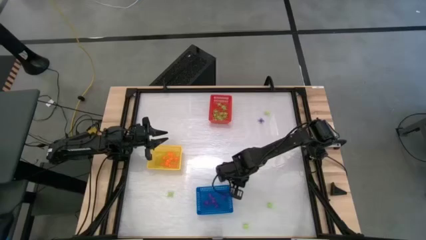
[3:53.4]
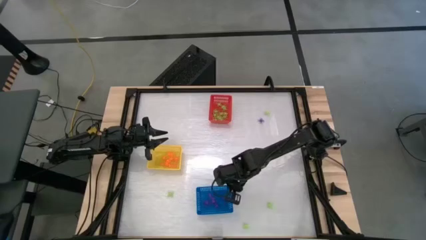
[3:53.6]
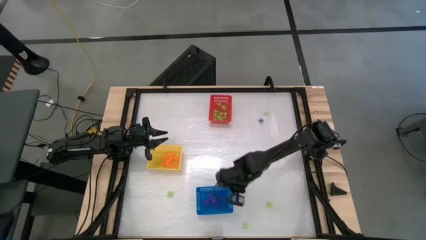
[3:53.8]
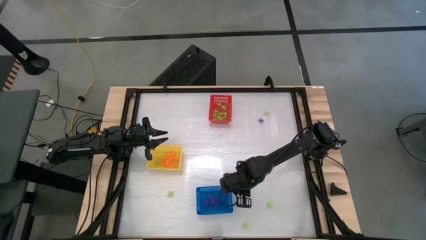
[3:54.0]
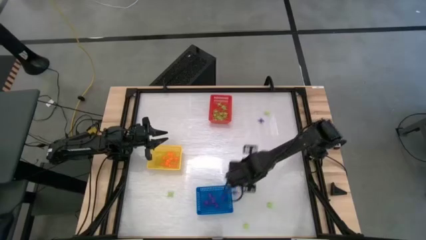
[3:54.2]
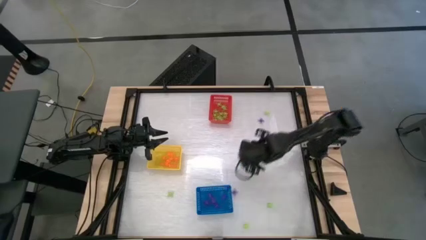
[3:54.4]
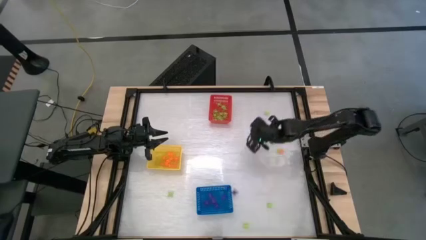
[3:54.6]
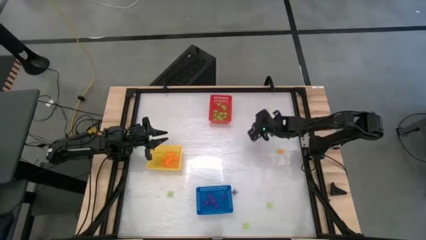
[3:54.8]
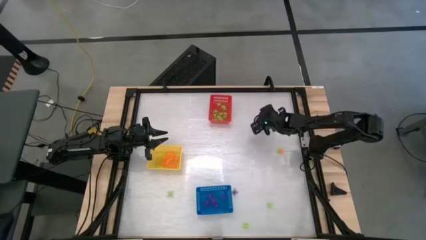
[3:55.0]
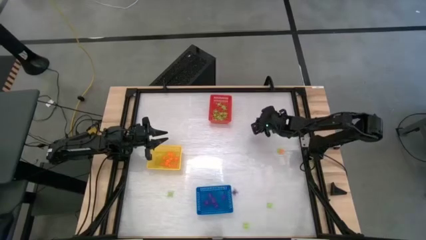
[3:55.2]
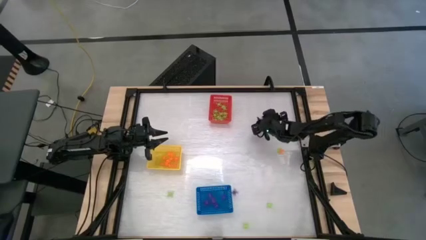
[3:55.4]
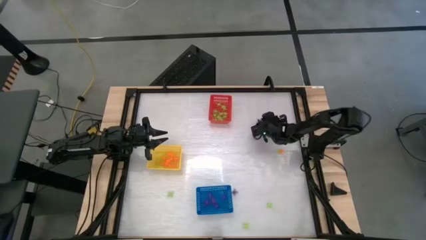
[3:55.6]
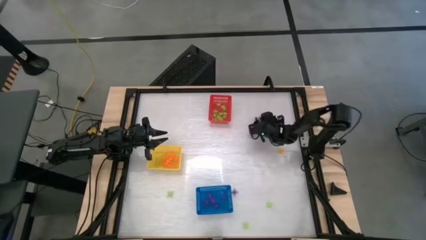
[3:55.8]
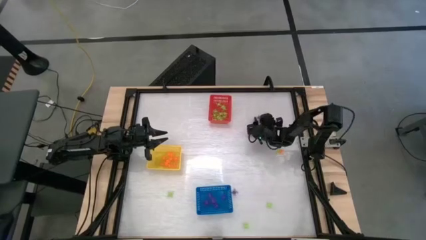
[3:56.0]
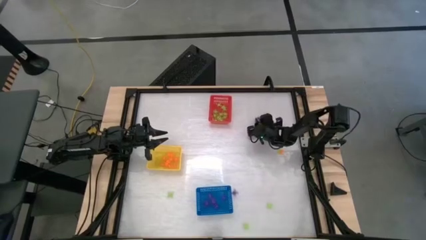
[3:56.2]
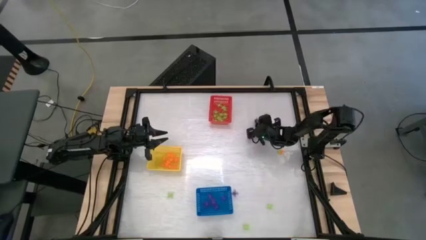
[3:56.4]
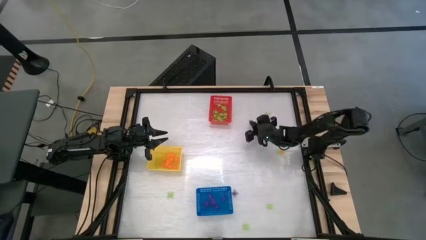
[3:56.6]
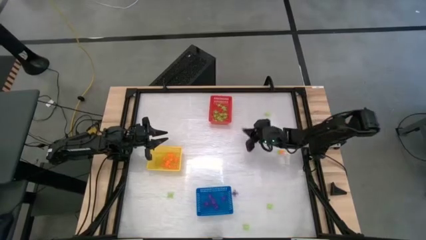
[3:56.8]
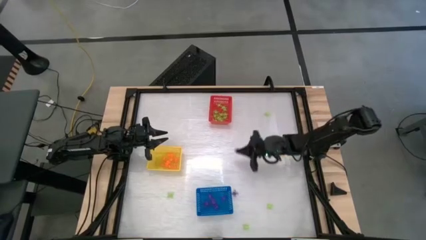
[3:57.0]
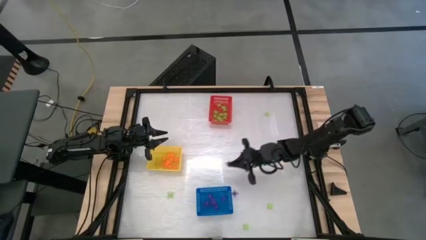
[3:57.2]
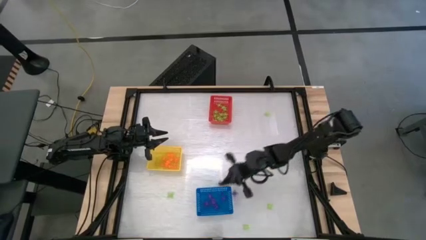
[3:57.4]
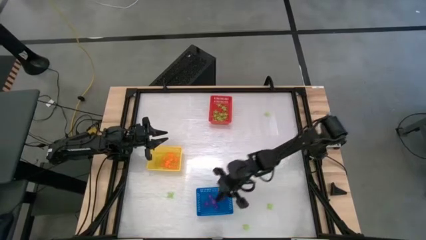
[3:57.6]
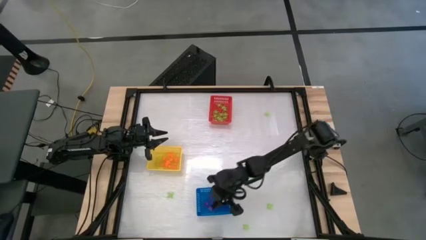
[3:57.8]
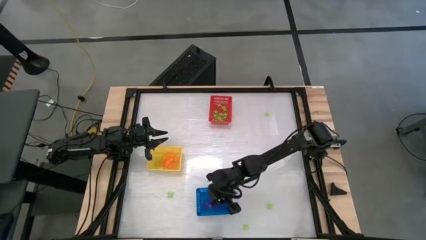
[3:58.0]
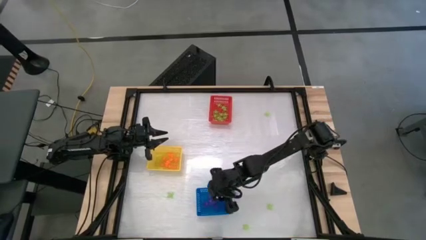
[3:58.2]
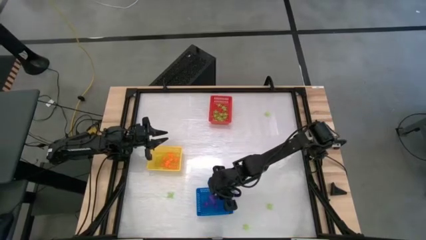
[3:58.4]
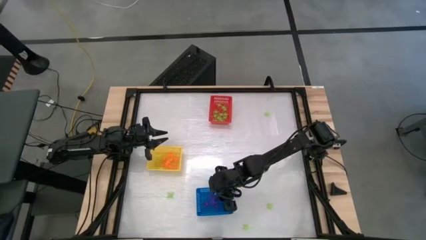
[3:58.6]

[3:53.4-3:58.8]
Task: Sort Halloween decoration
Put the purple spider toy into the blue basket

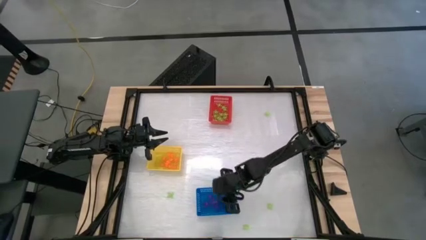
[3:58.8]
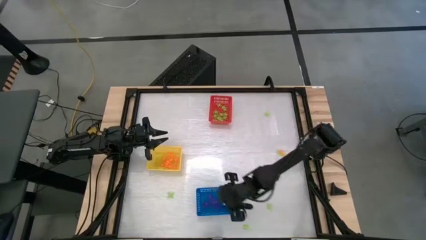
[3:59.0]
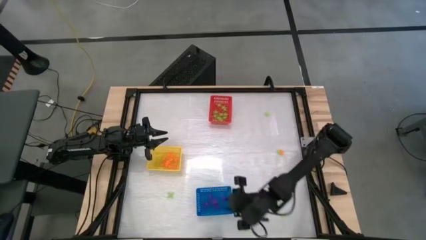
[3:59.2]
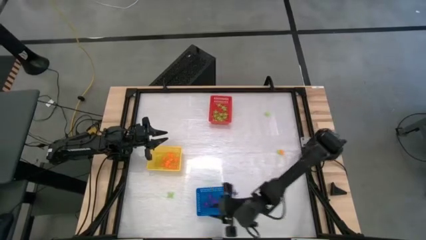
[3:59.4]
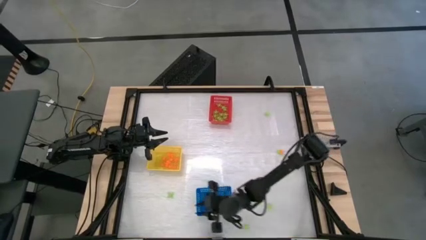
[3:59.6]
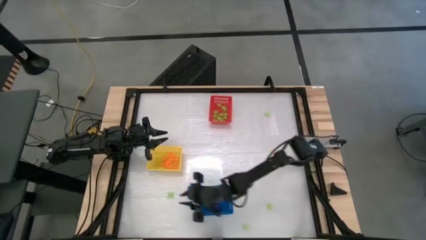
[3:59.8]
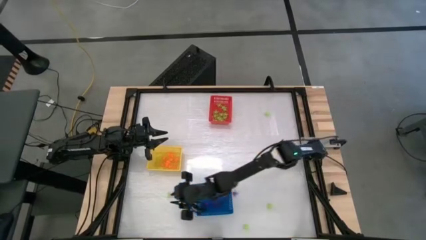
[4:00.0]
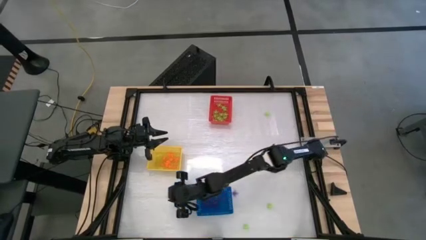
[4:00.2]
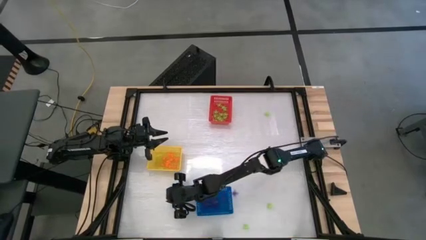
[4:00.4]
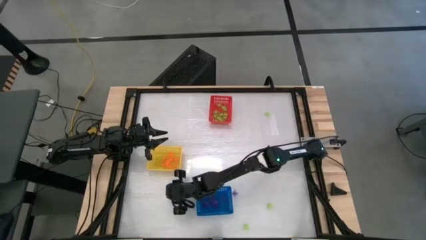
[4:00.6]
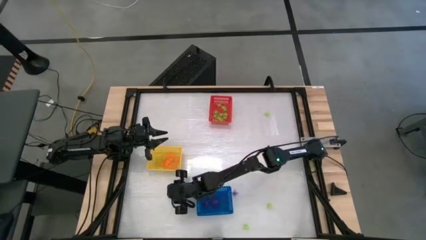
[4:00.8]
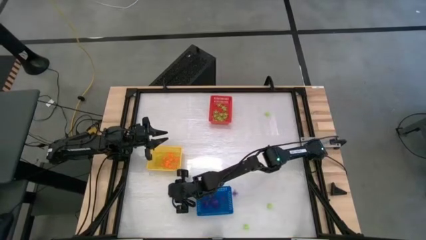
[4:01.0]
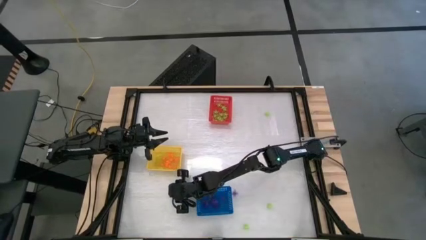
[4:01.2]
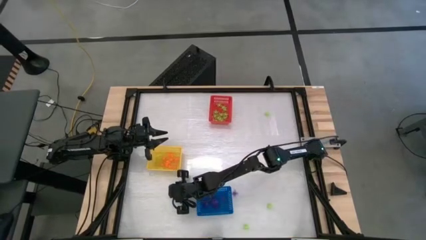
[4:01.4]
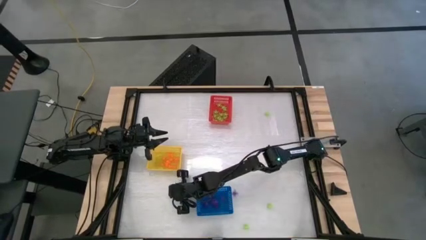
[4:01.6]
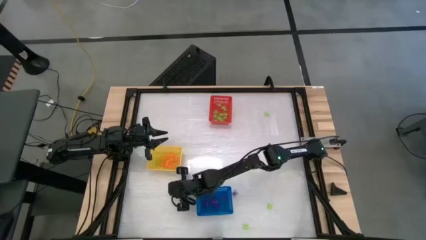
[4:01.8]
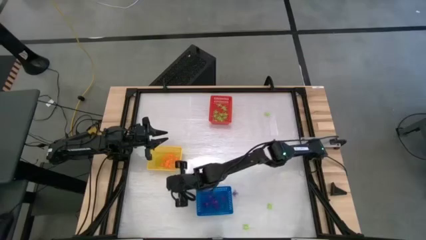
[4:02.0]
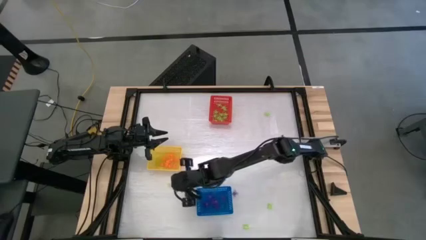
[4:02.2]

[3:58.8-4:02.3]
Put the green spider toy into the red basket

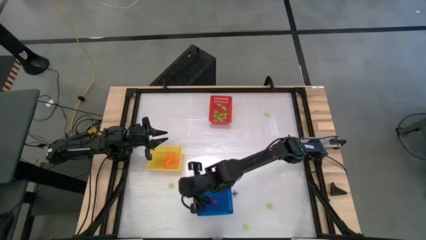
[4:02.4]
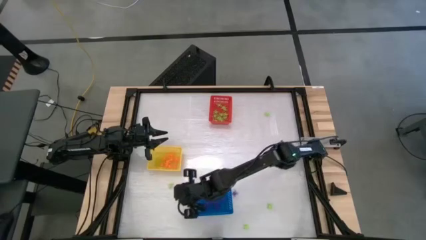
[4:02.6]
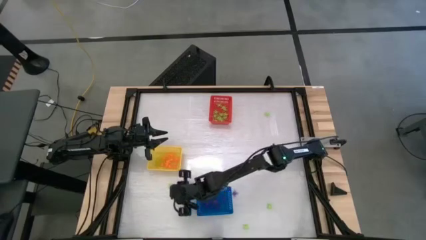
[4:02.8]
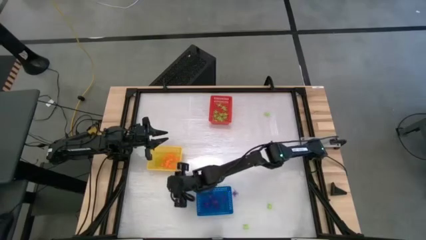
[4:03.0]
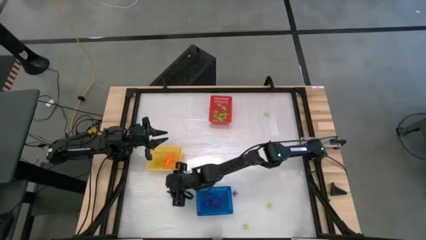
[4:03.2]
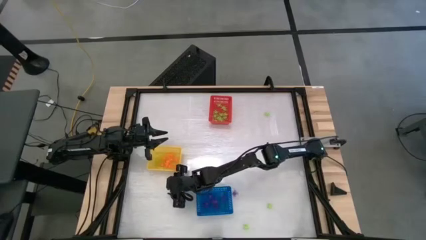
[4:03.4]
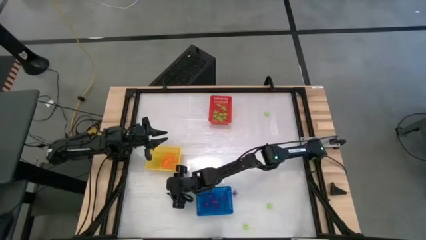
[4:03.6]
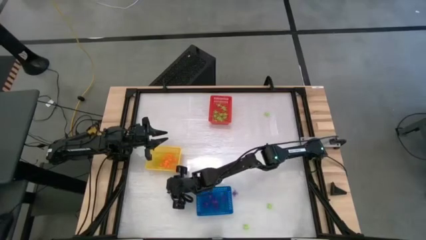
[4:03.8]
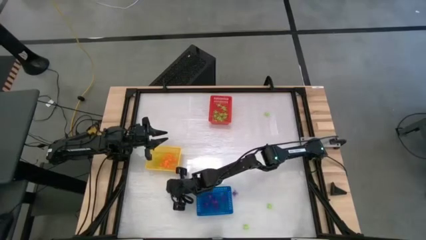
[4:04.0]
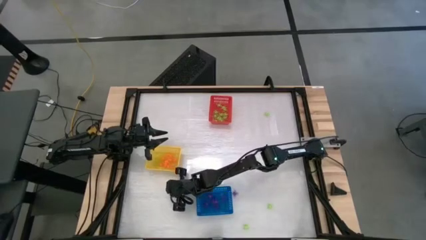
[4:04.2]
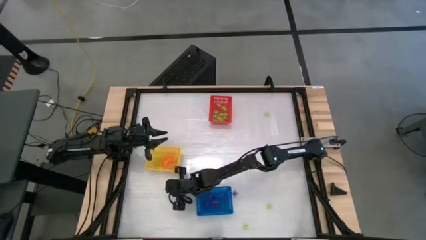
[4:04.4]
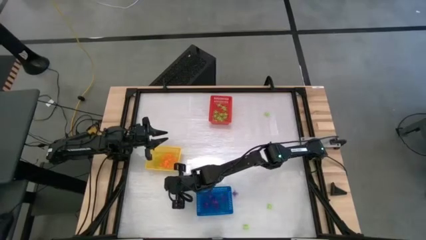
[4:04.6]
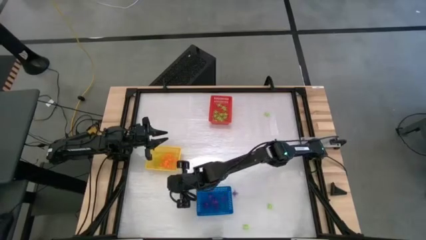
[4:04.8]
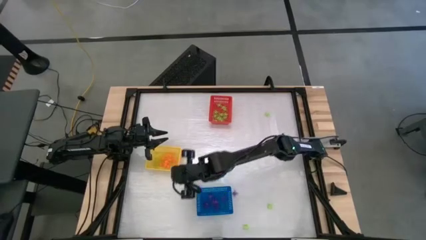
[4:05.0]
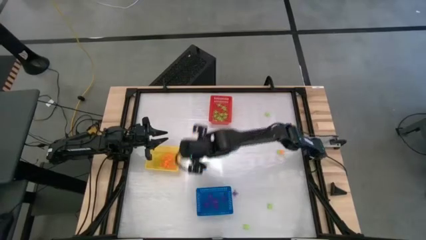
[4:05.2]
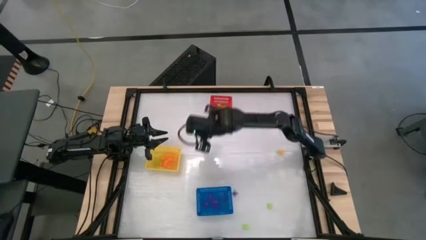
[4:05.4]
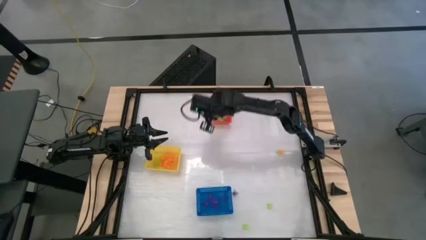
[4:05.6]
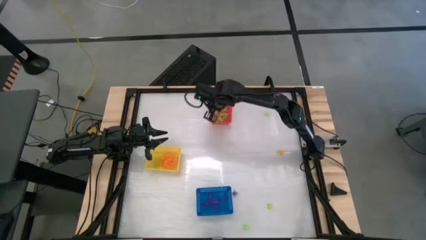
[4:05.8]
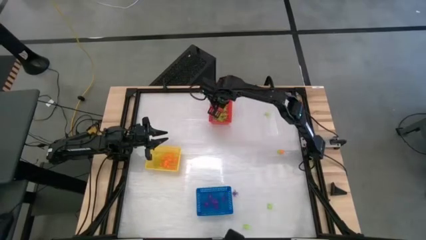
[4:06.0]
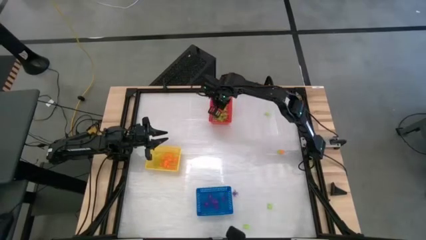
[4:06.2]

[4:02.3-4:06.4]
Put the green spider toy into the red basket

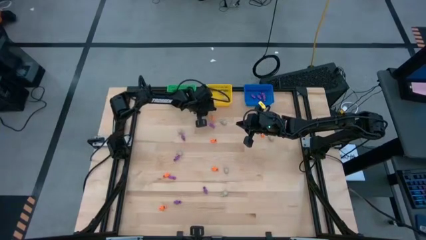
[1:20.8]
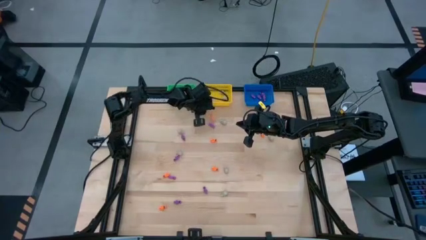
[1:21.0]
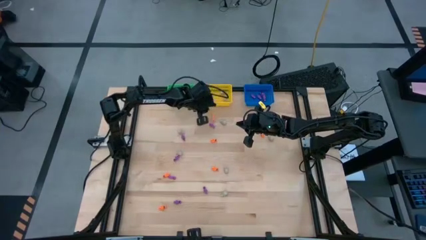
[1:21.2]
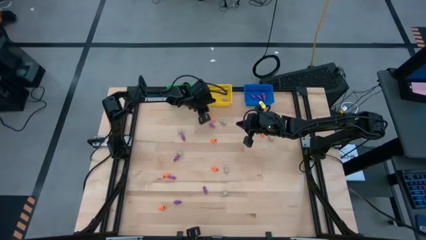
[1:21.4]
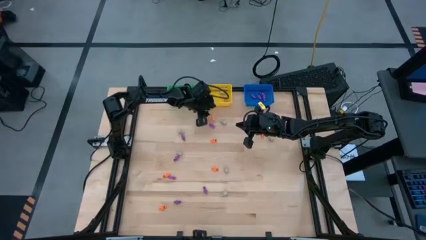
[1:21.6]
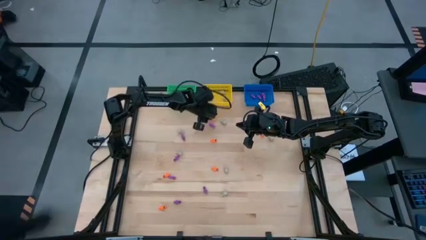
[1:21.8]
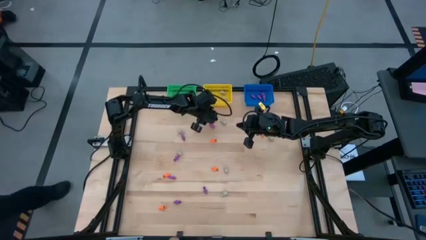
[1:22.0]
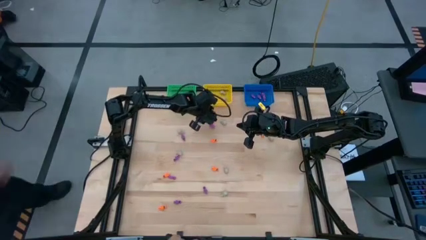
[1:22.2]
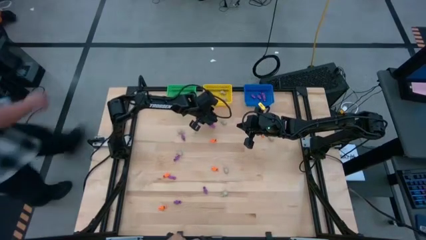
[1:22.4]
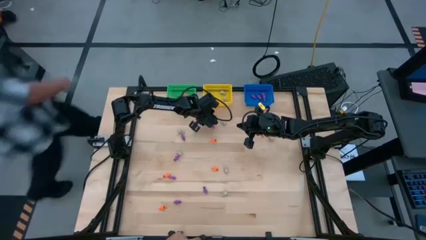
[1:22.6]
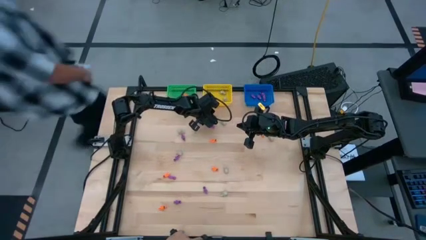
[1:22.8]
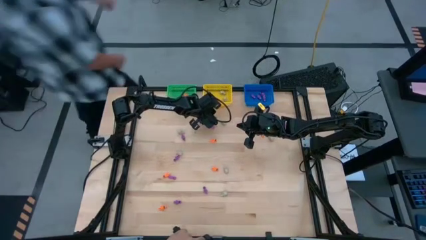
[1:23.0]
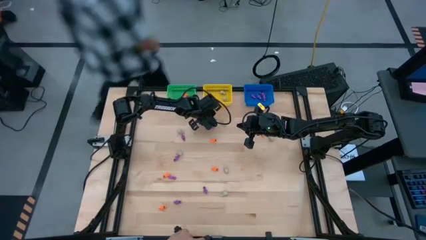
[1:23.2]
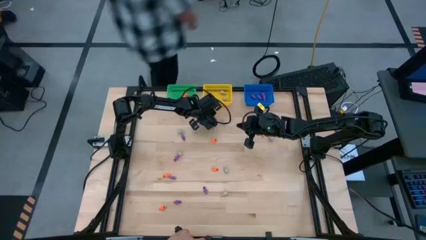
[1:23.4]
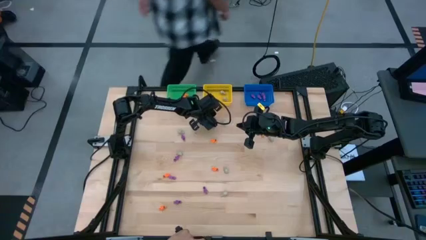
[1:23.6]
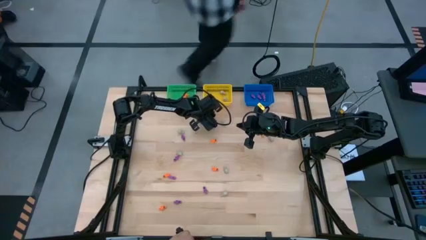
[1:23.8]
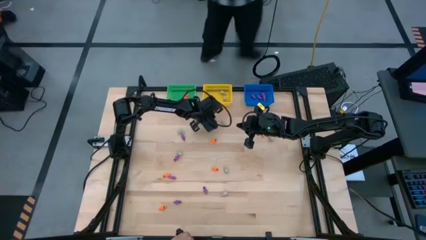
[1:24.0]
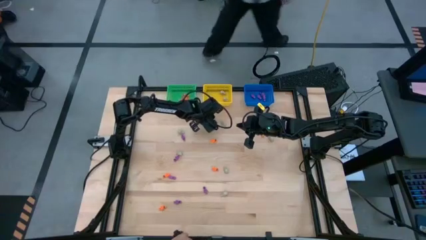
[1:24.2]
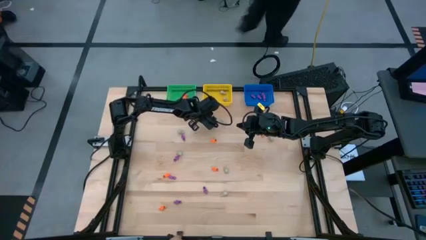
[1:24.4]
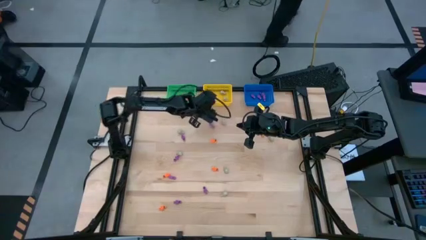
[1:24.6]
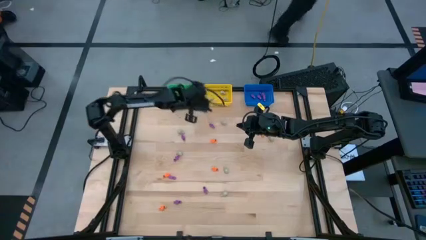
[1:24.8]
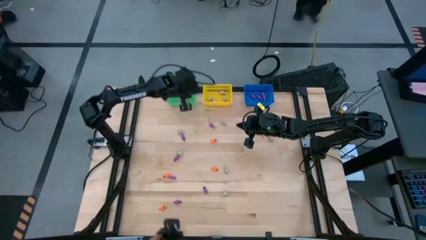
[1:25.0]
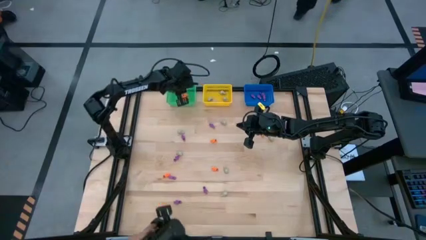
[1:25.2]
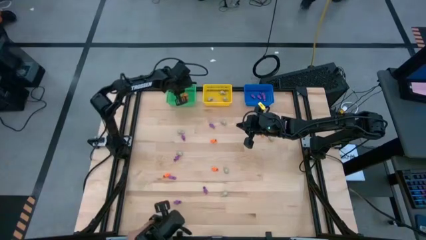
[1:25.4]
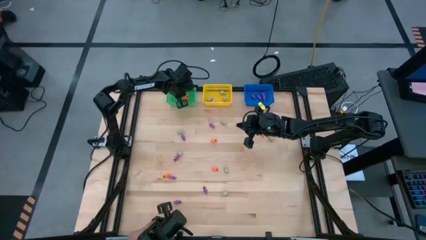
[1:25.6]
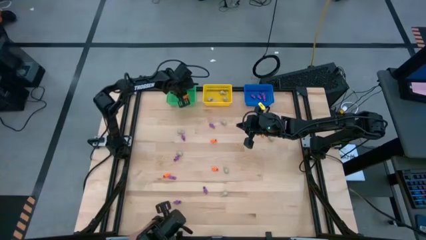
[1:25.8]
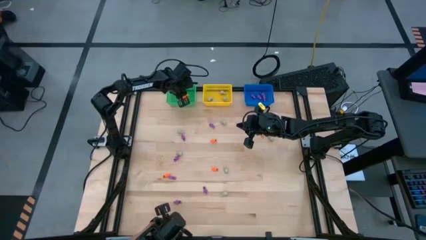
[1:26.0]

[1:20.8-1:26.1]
Task: Sort Halloween decoration
Put the orange skeleton toy into the green bin
